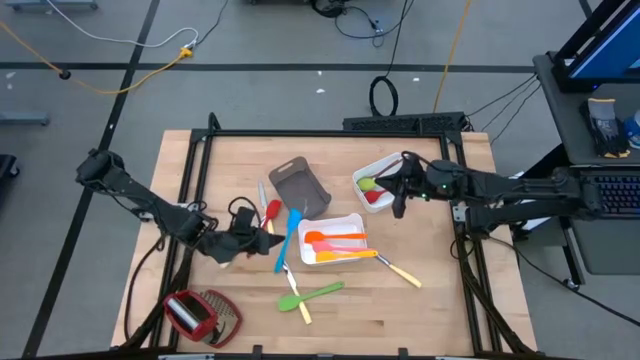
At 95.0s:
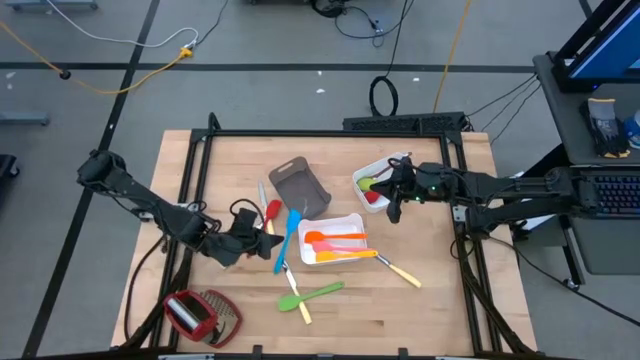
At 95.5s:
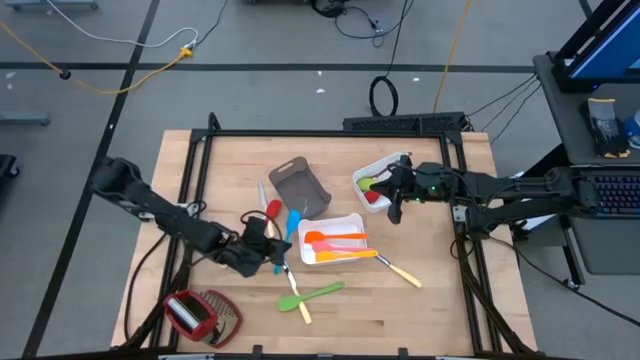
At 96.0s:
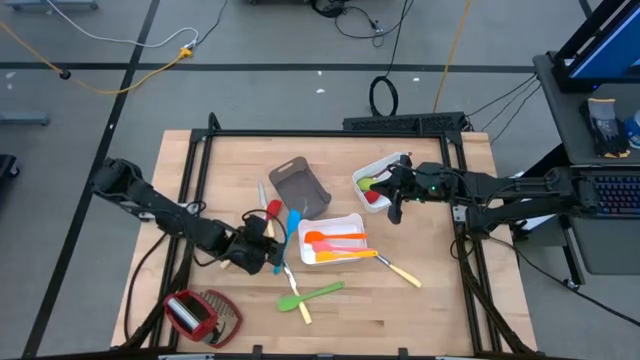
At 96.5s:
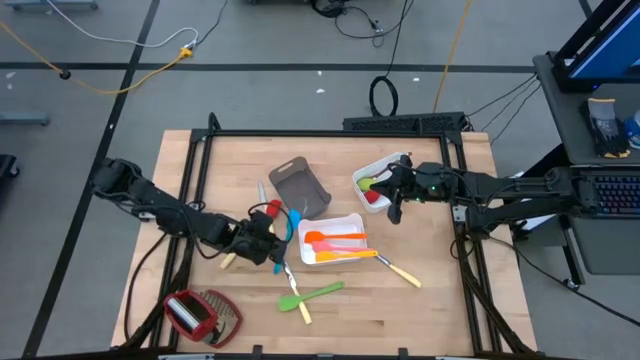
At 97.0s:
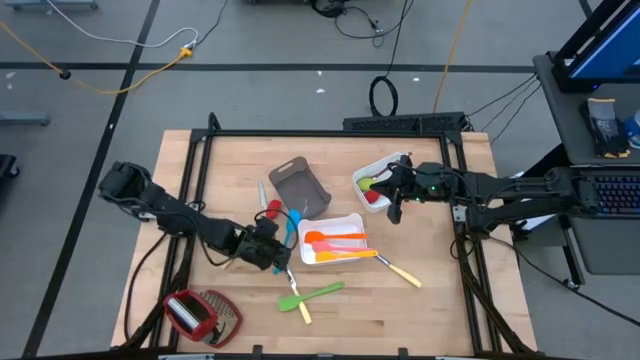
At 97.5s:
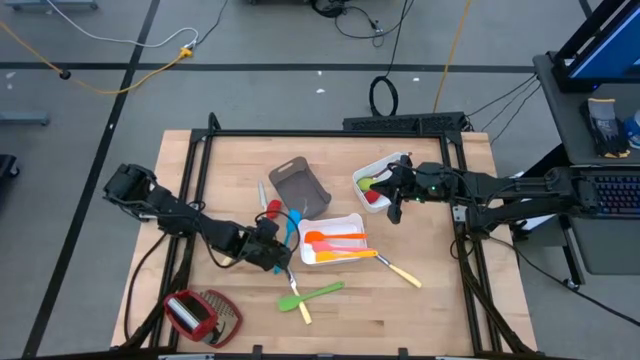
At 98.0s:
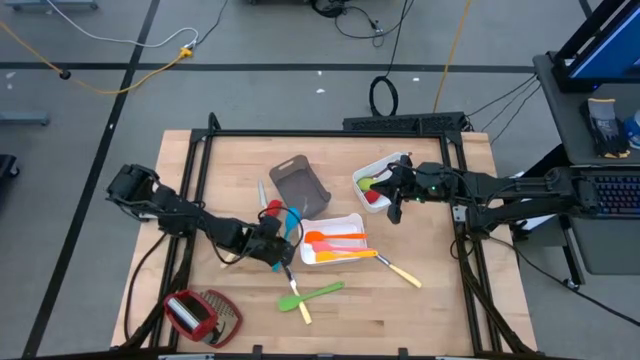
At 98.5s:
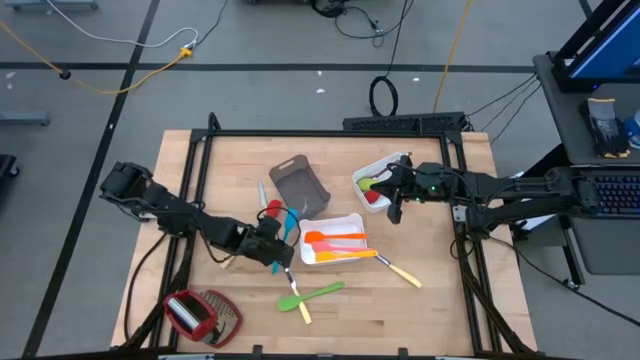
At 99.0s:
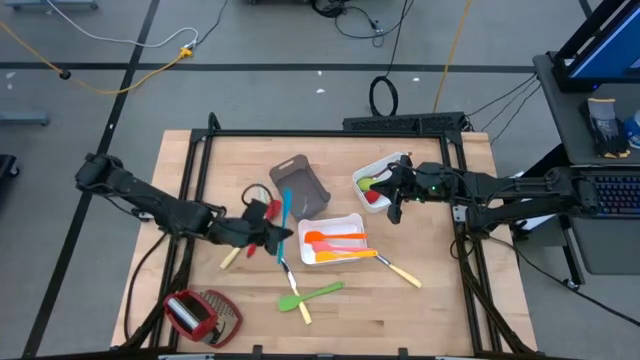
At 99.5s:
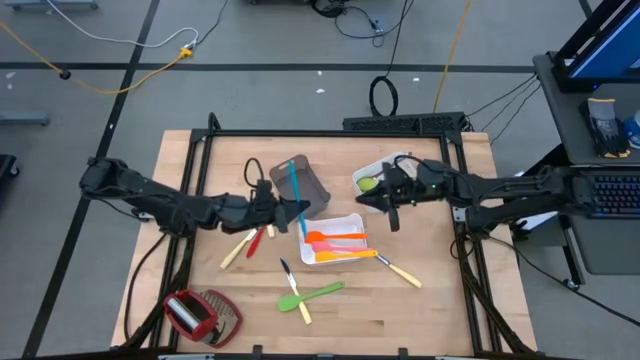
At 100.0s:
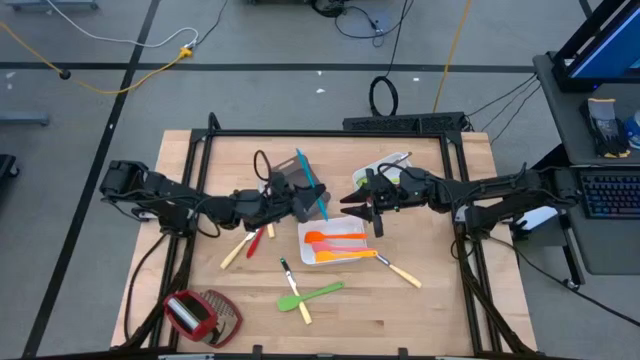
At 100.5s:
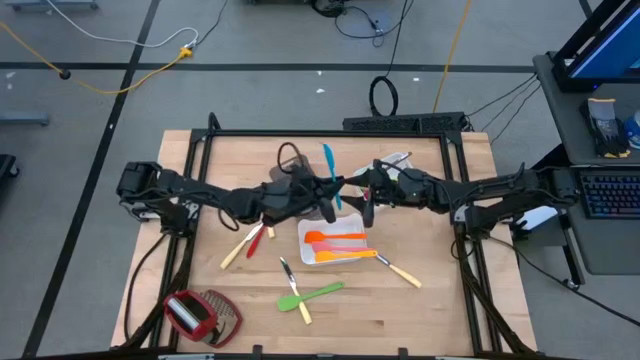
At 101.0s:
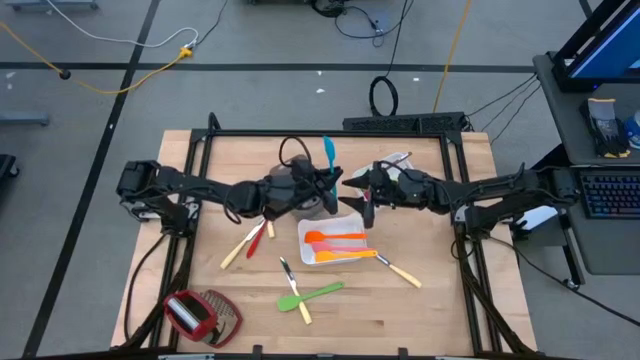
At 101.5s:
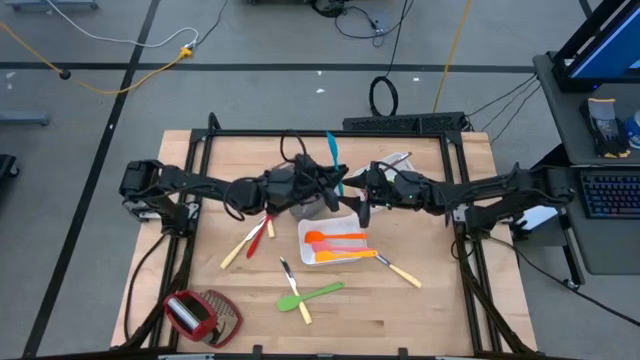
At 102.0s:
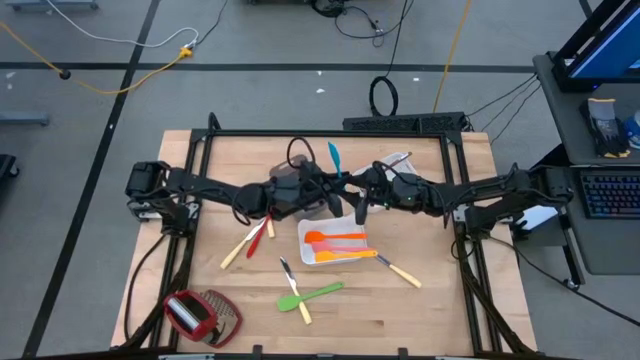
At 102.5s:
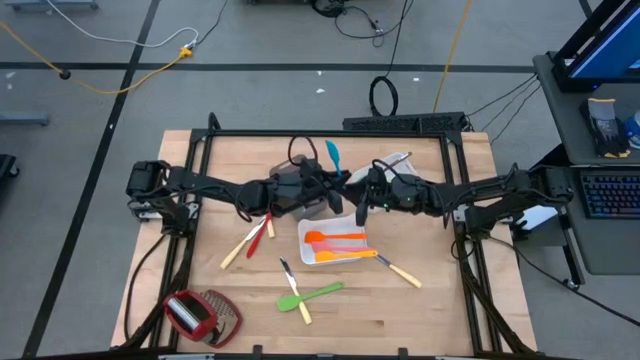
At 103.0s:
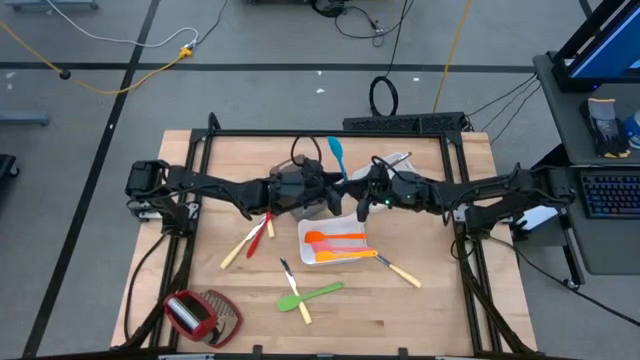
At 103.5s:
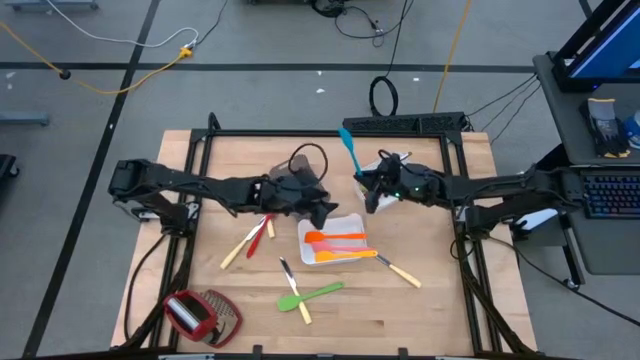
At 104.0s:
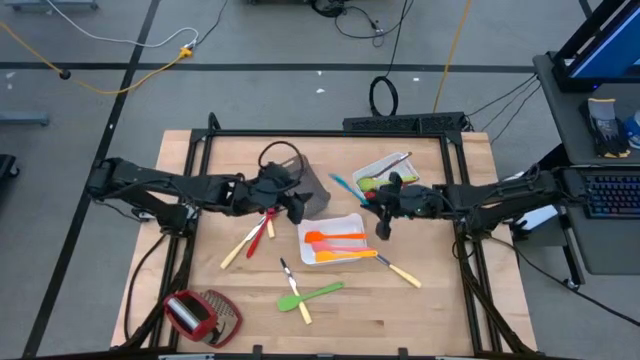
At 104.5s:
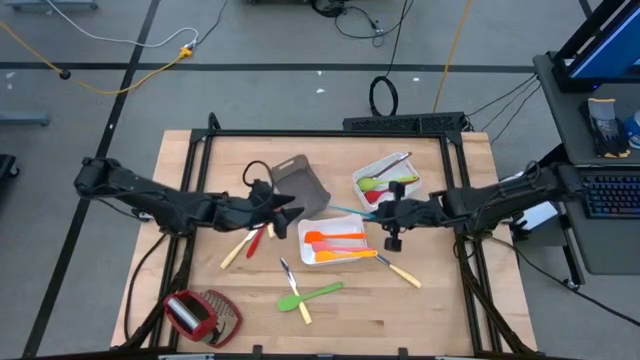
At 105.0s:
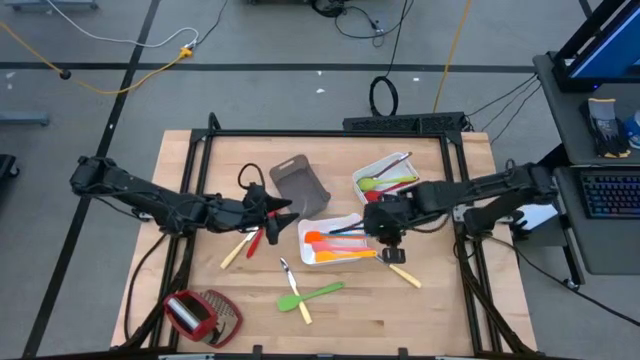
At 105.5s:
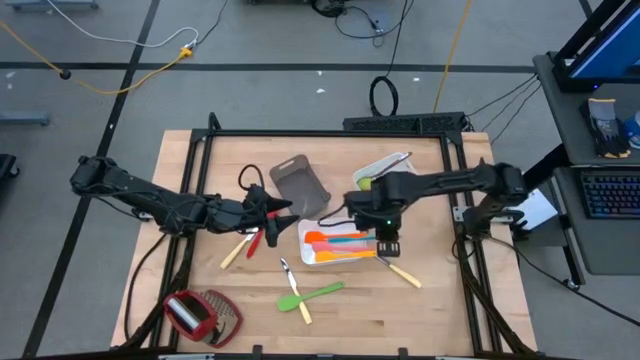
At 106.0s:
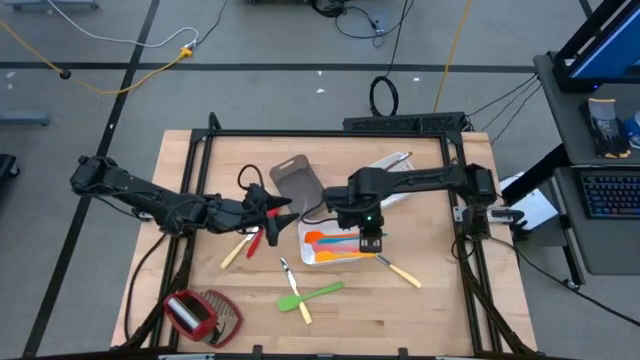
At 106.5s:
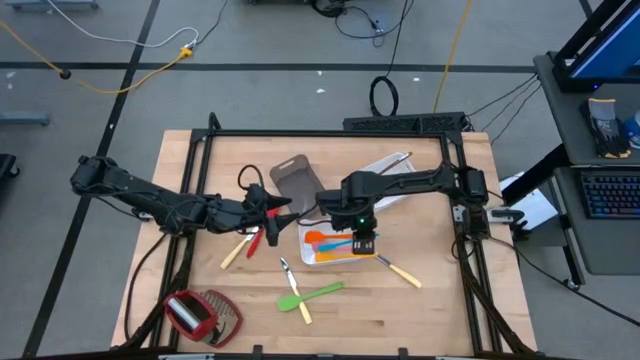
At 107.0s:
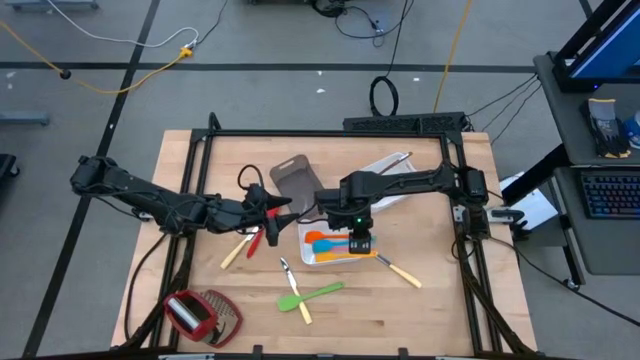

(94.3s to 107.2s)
Task: Pick & Place Kitchen Items
Put the blue spatula into bottom white bin

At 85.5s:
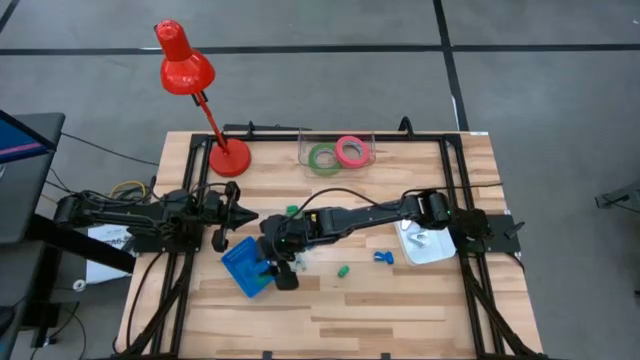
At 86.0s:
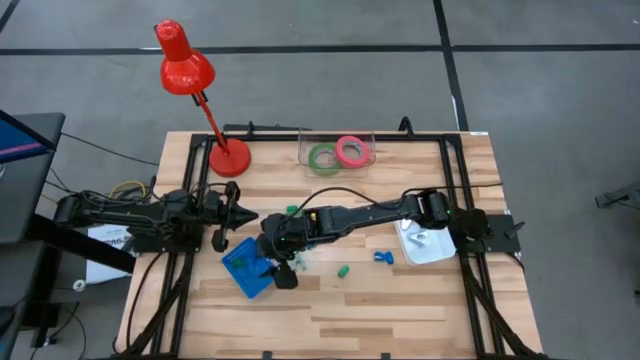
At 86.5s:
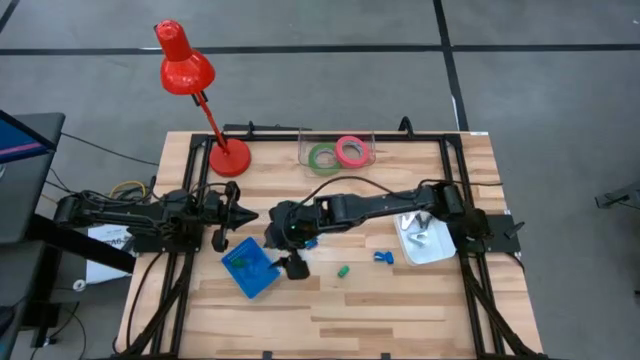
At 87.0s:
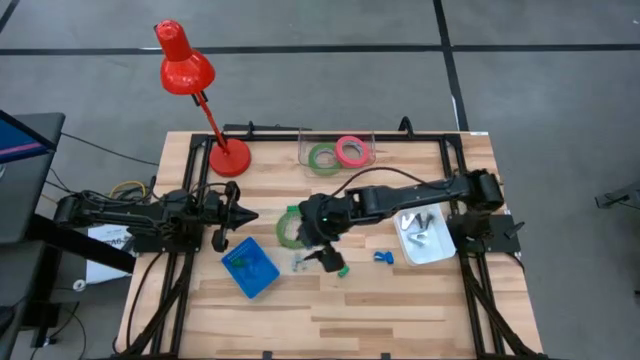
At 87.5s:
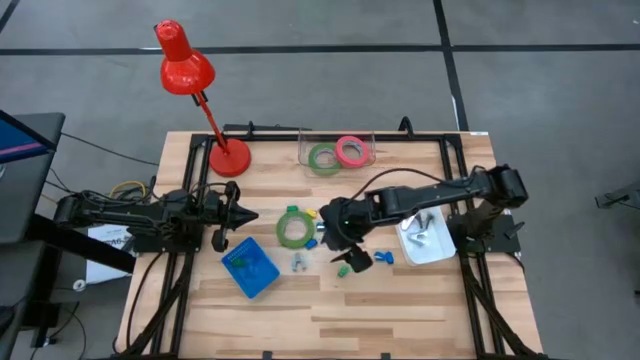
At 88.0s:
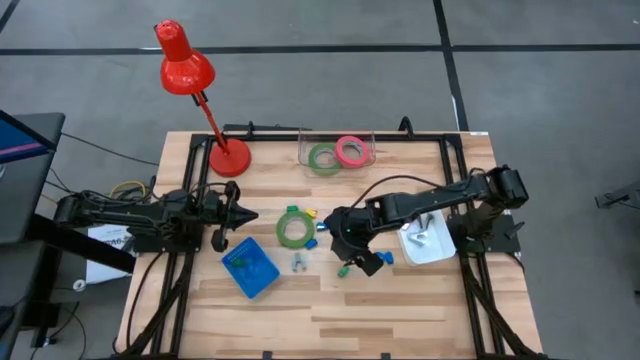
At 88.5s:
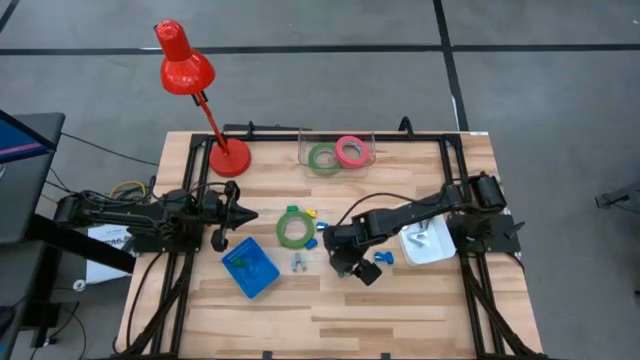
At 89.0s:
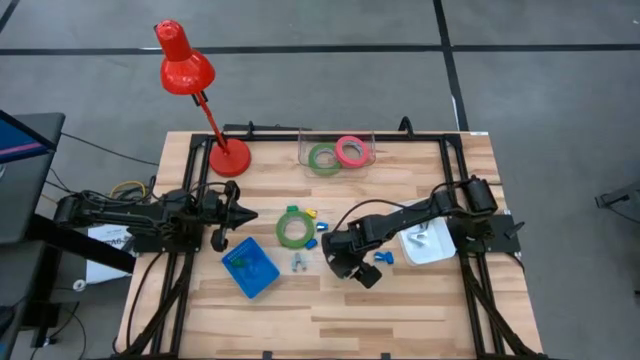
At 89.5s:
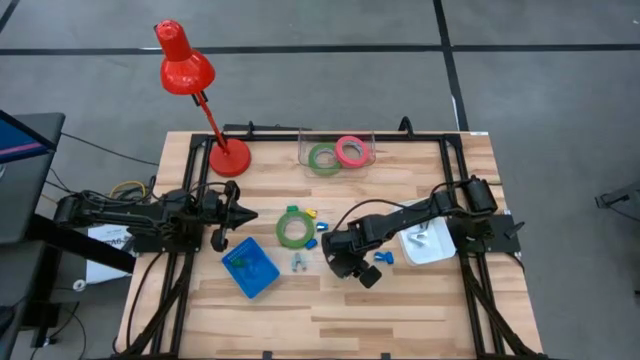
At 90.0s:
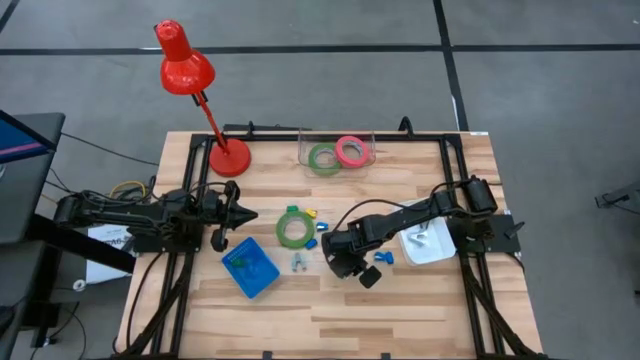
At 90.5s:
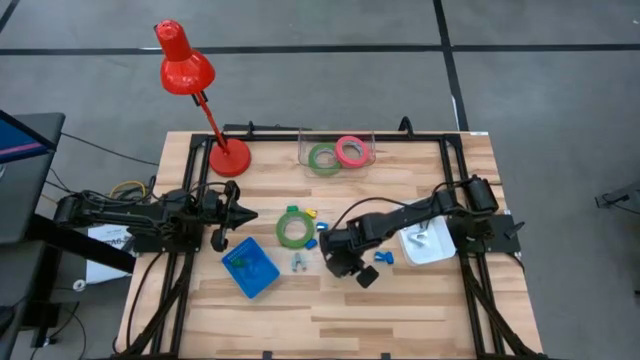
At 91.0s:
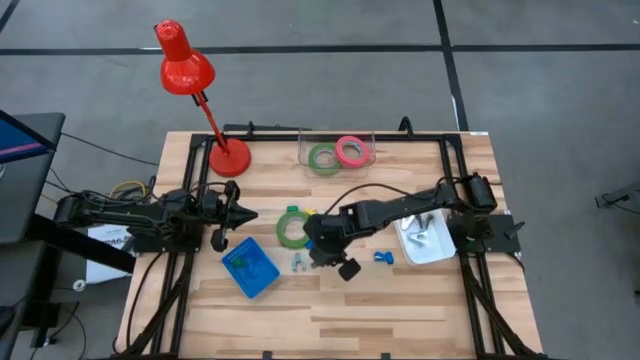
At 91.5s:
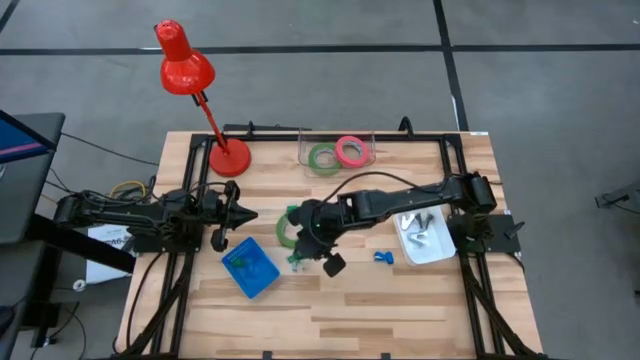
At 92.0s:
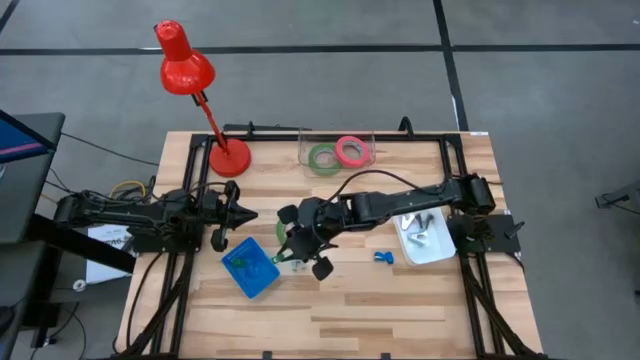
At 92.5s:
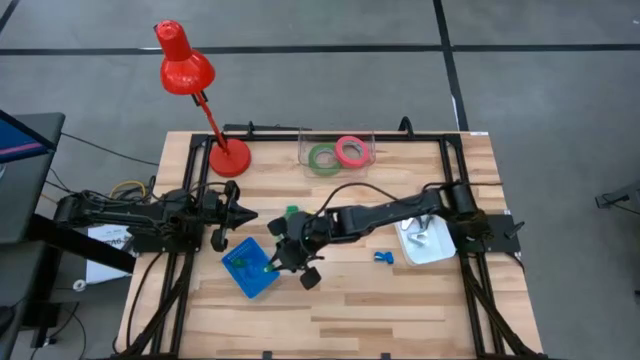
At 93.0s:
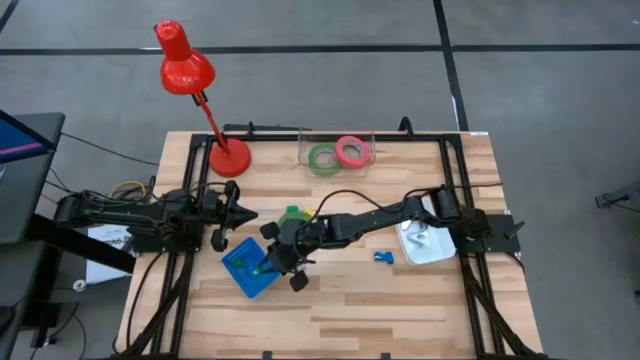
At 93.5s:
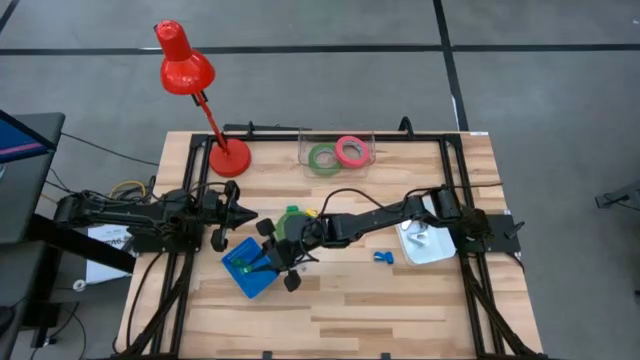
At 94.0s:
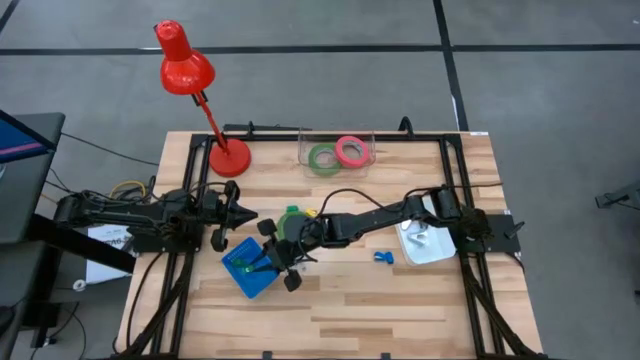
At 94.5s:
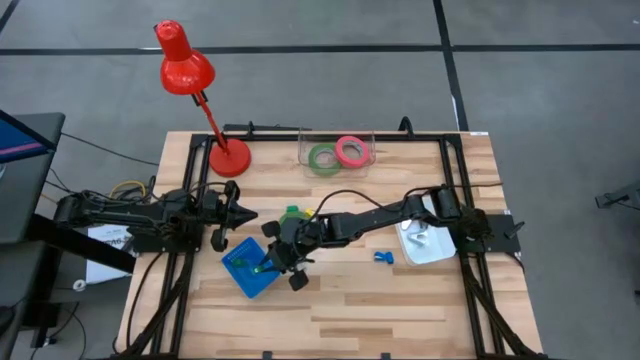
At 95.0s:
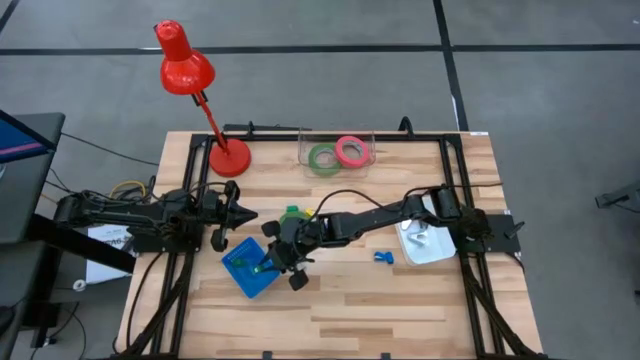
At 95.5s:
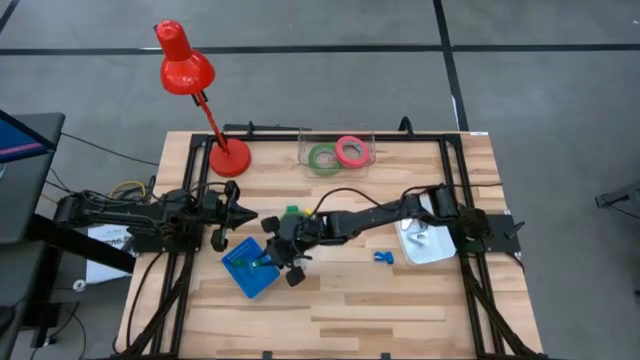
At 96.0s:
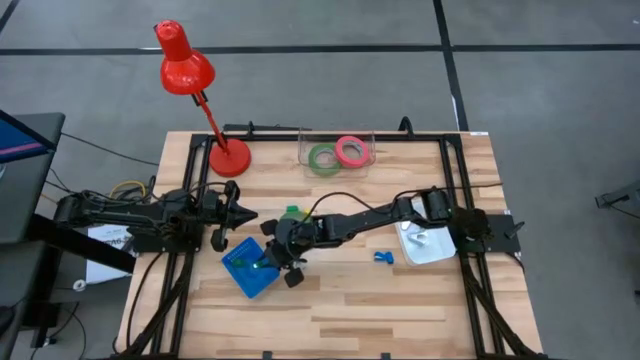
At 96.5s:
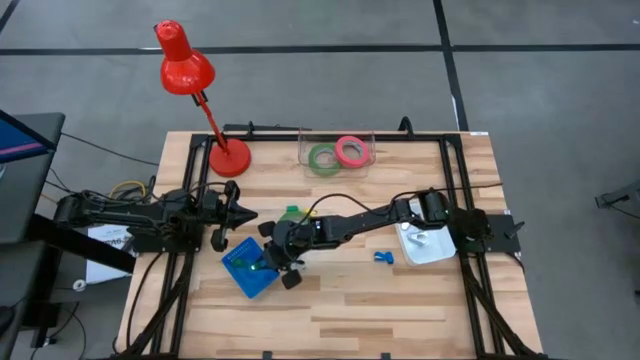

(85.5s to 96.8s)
Task: Pick and place Stapler, Stapler remover, tape
Put the bottom green stapler into the blue bin
